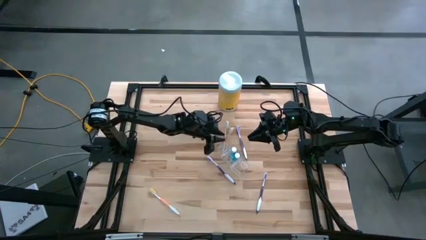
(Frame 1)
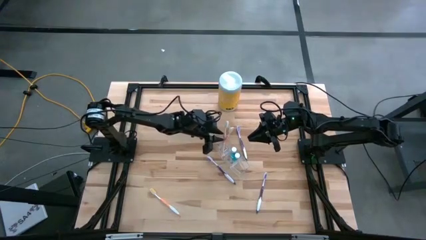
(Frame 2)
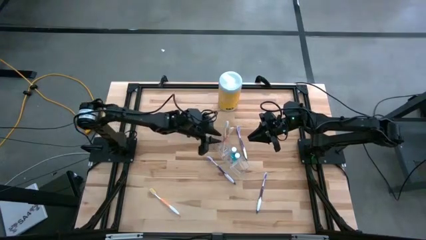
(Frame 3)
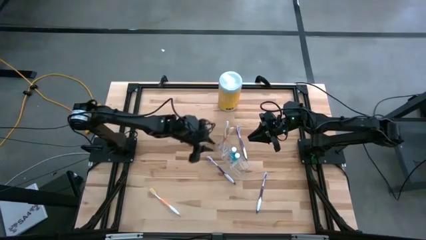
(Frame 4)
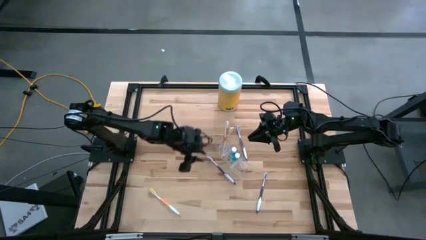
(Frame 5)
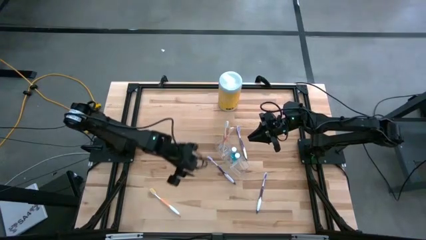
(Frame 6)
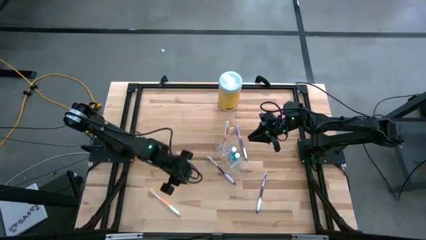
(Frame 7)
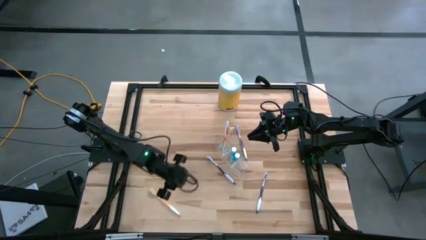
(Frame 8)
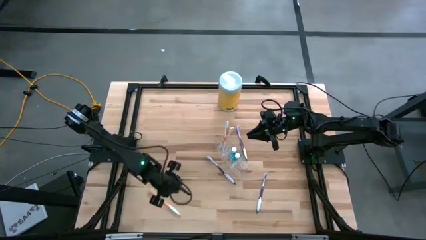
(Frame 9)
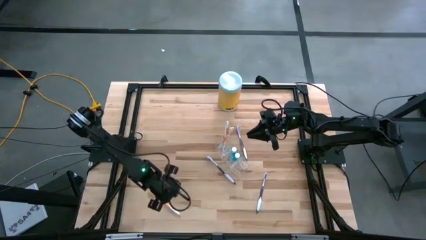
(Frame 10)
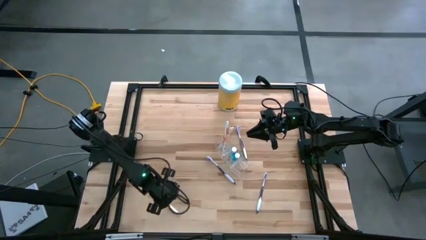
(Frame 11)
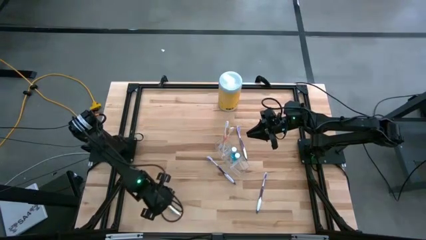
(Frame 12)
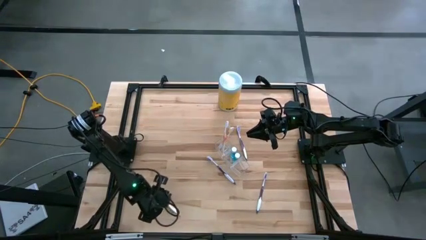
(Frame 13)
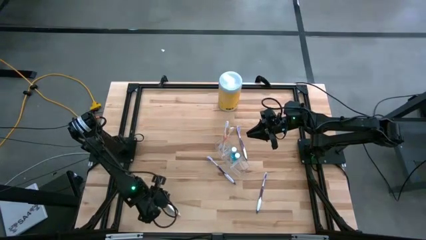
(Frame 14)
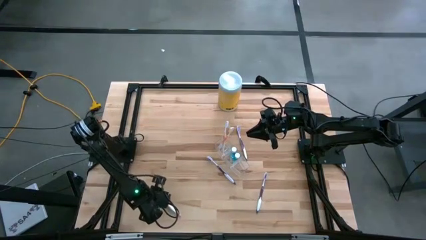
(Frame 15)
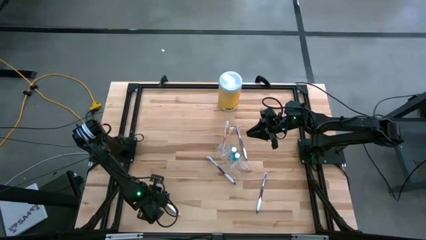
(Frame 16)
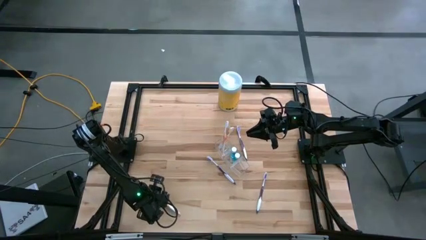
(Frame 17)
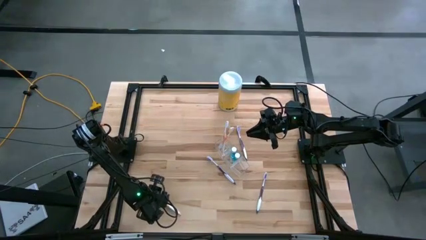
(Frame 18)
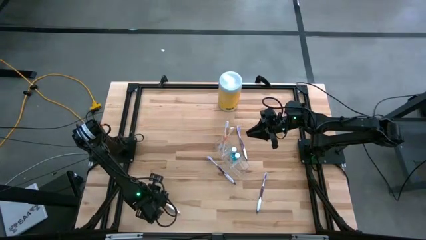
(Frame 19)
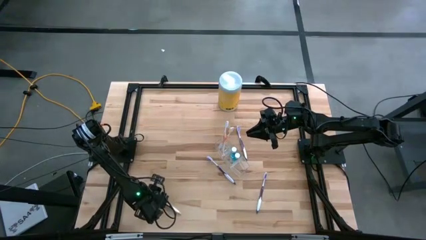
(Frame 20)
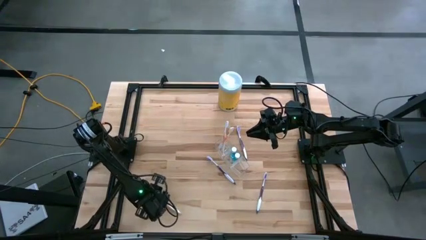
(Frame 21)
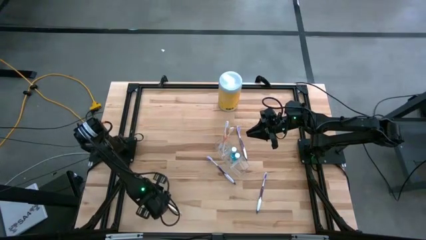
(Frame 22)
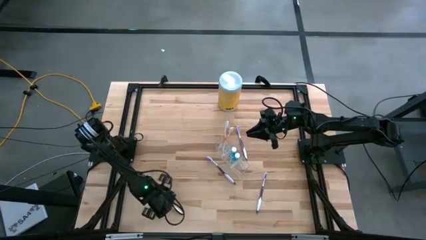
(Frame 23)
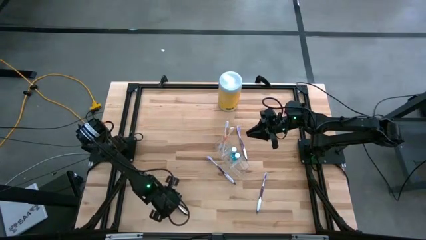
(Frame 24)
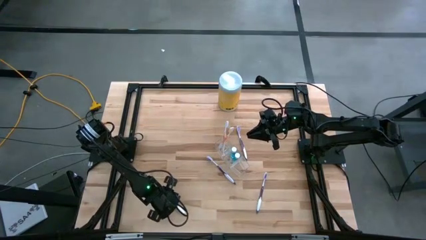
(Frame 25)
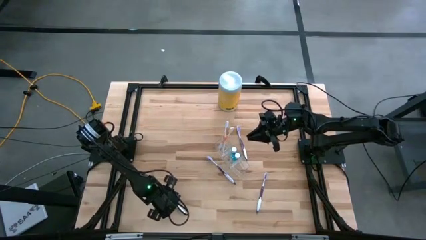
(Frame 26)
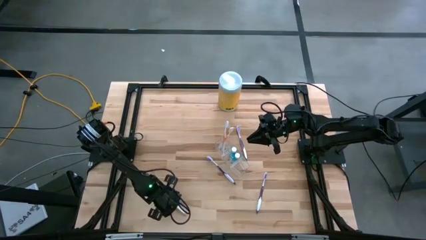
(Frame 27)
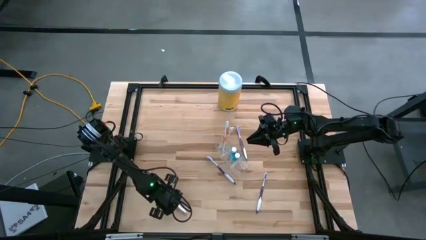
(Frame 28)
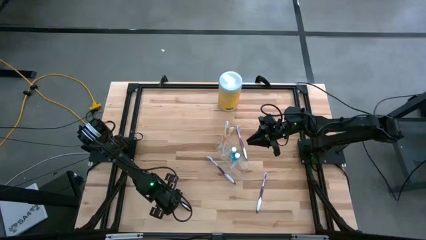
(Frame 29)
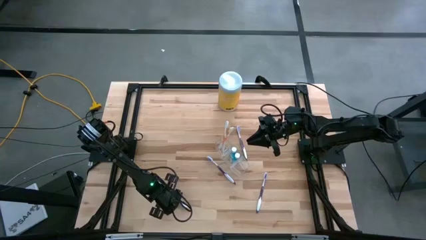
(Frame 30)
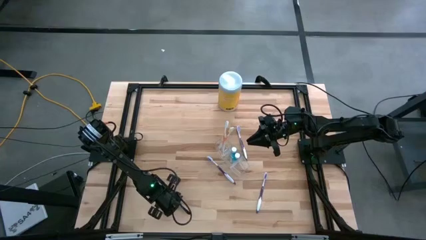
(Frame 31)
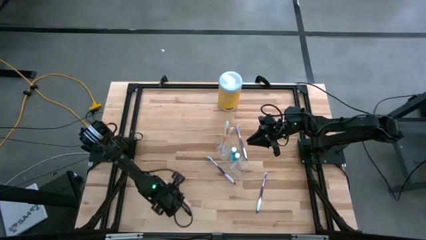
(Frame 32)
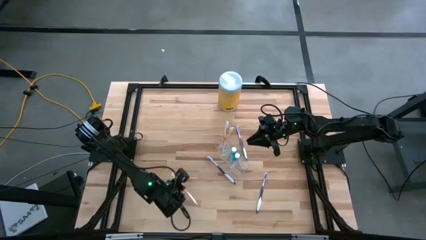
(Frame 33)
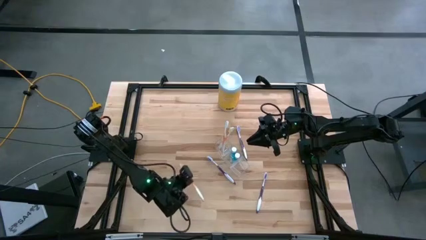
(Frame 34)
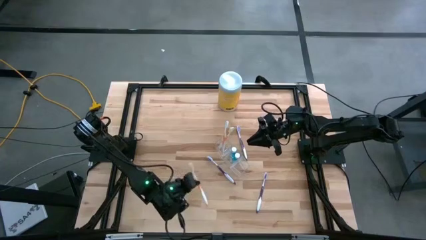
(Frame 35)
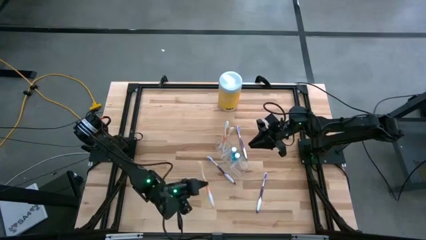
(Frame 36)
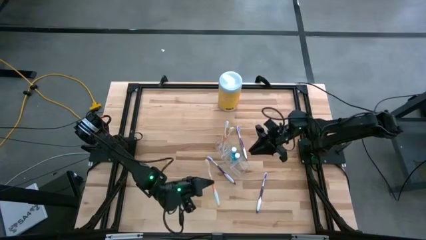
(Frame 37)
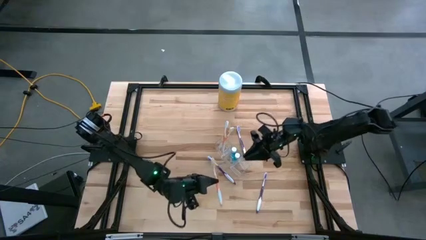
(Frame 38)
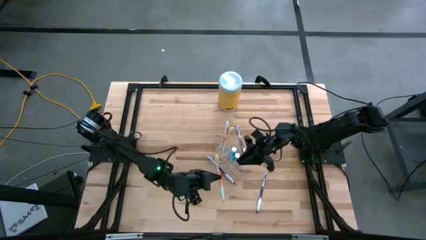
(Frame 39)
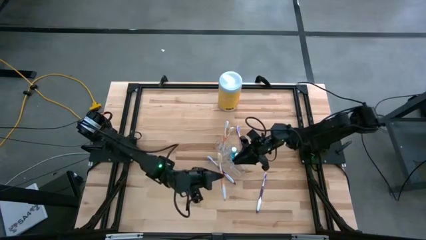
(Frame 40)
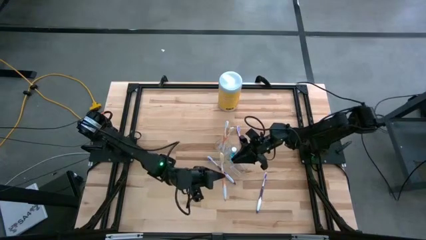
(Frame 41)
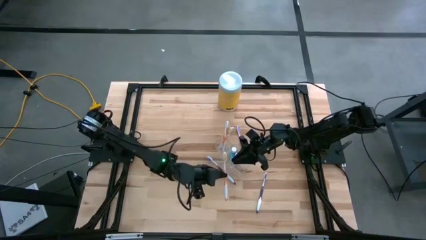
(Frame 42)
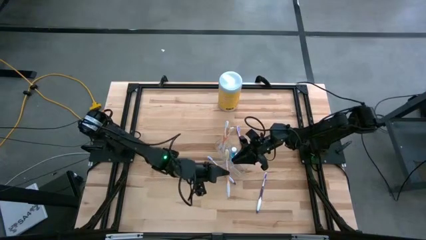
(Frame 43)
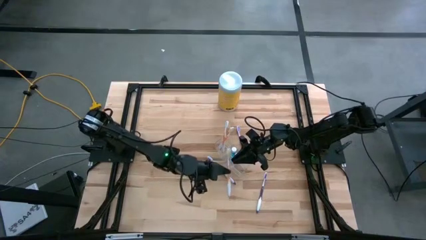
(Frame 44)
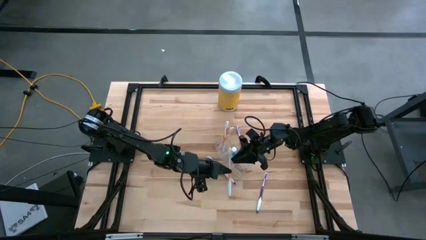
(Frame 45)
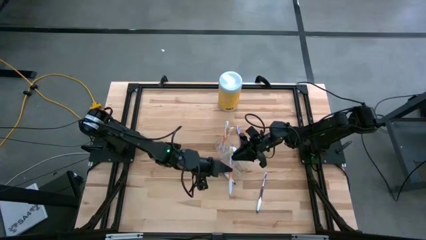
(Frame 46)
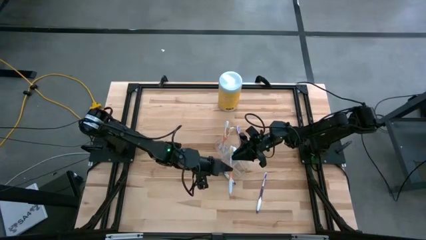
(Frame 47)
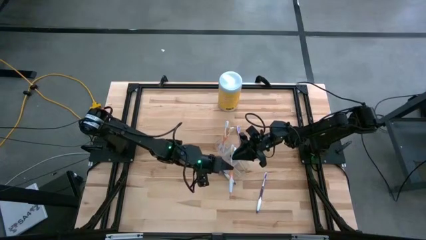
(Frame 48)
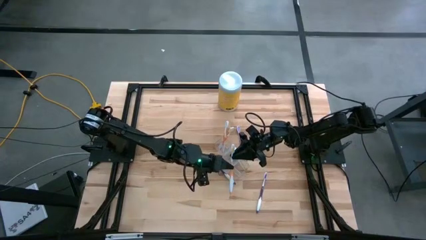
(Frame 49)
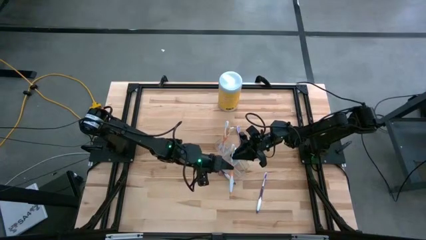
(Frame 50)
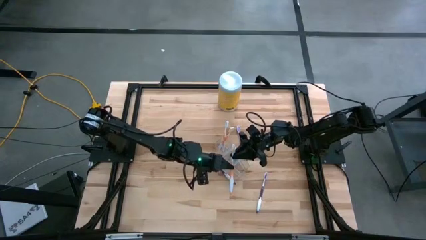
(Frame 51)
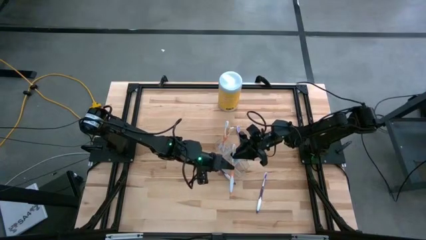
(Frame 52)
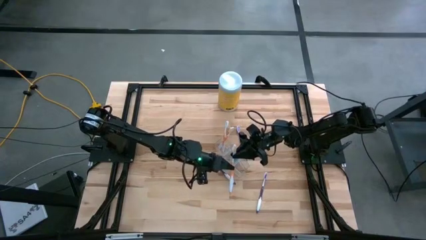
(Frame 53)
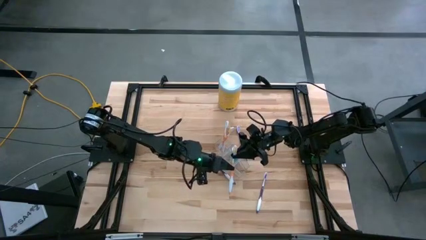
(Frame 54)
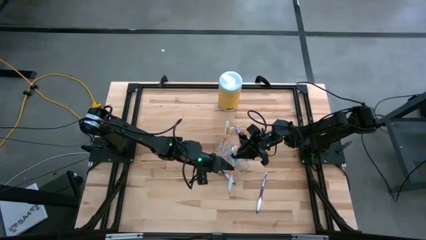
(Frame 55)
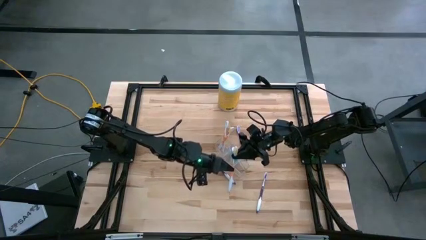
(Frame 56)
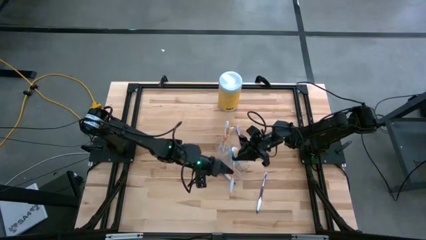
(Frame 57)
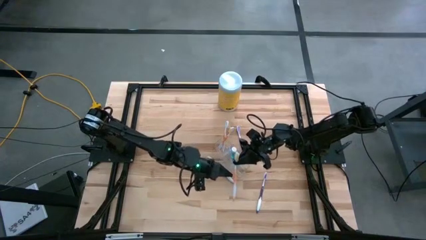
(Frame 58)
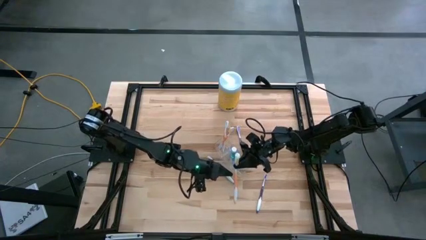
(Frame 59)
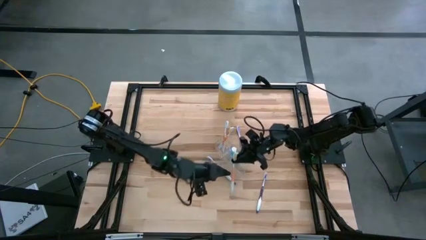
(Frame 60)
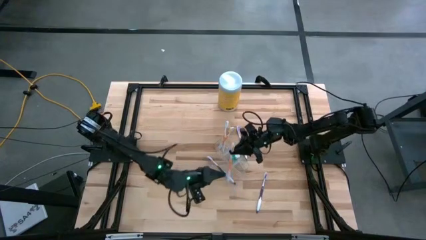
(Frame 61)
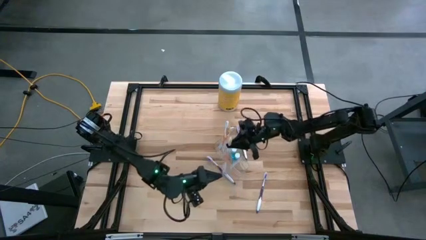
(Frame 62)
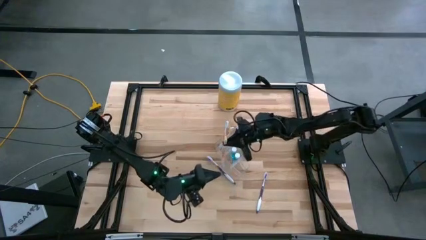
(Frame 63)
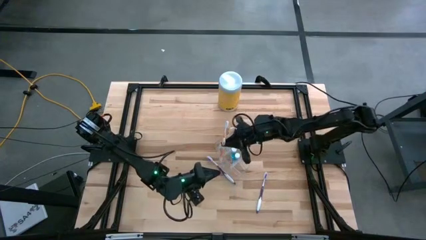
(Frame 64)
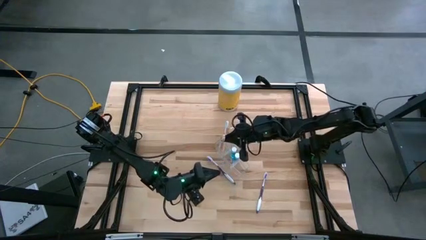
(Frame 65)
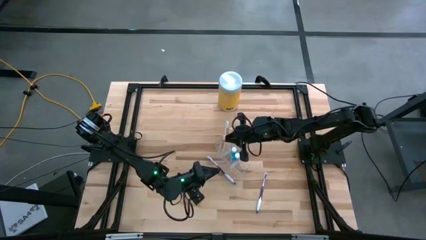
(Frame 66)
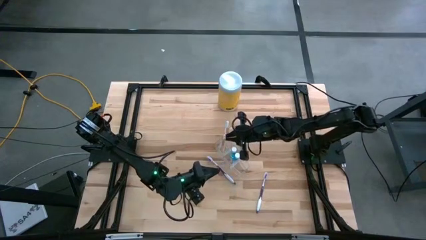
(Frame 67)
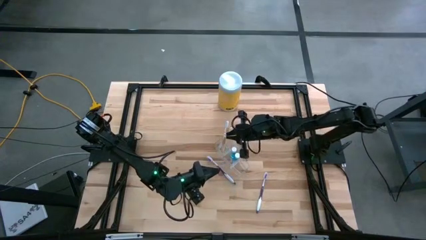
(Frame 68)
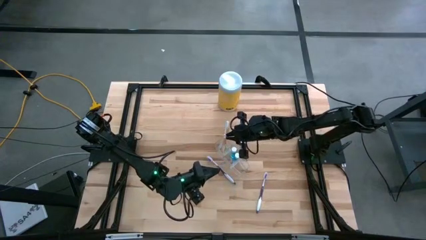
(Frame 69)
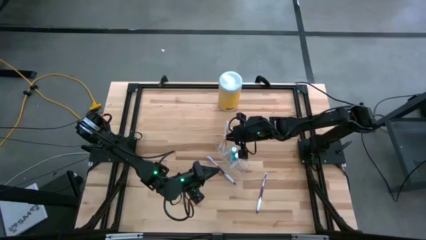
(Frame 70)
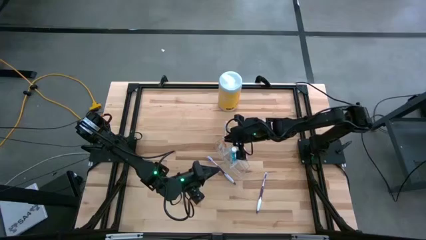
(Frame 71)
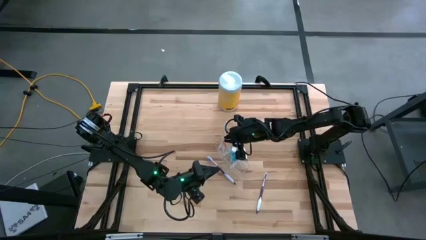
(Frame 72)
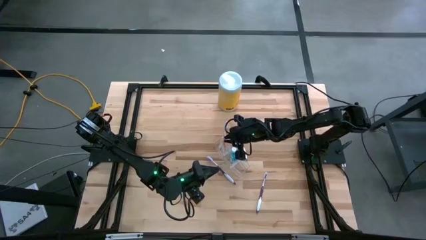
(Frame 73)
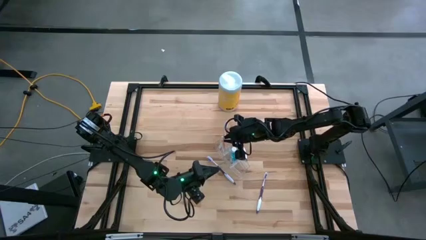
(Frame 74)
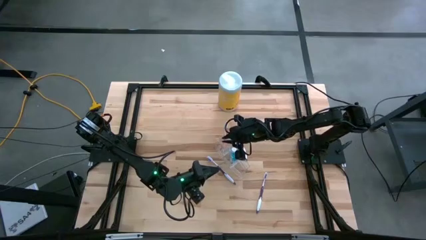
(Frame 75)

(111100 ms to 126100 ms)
Task: Pick & Place toothbrushing station
Put the orange toothbrush into the top compartment of the transparent organizer
